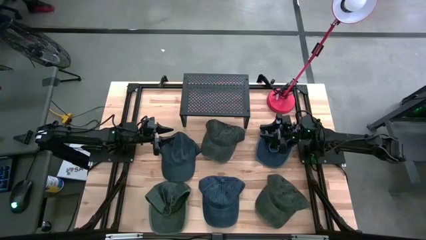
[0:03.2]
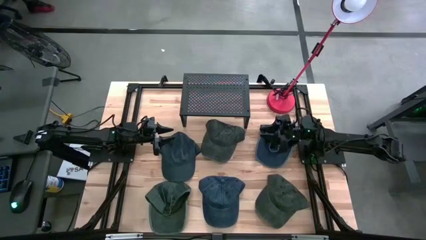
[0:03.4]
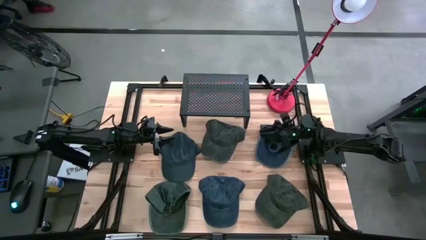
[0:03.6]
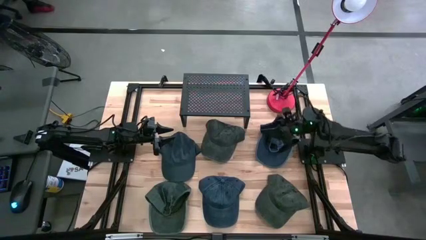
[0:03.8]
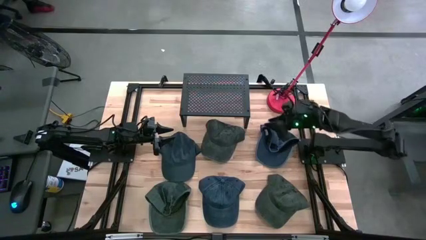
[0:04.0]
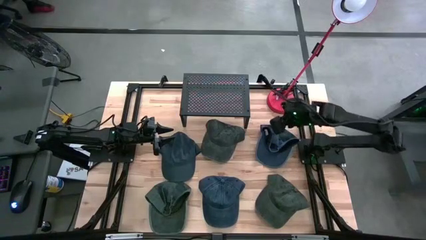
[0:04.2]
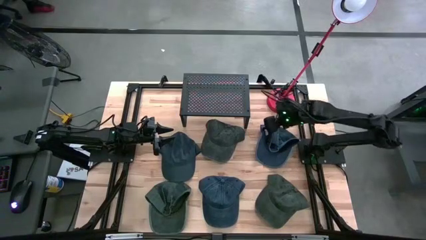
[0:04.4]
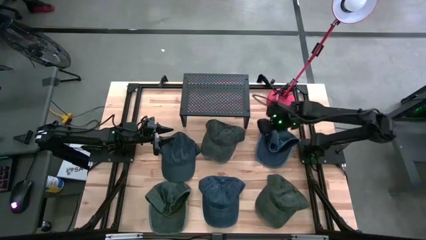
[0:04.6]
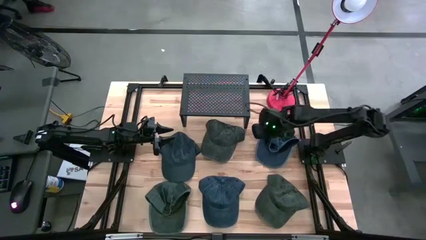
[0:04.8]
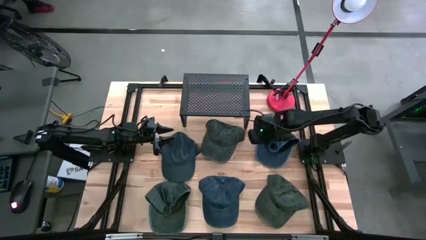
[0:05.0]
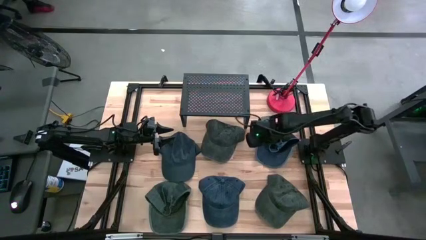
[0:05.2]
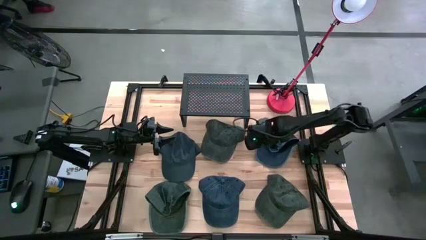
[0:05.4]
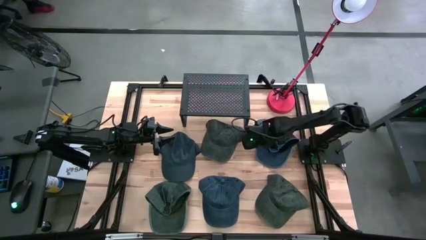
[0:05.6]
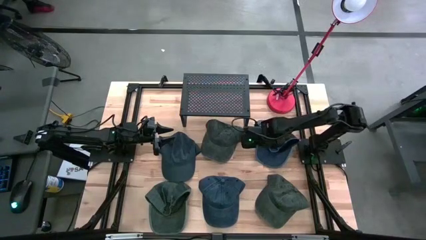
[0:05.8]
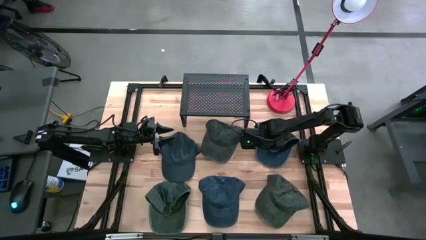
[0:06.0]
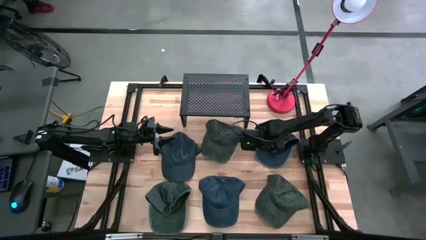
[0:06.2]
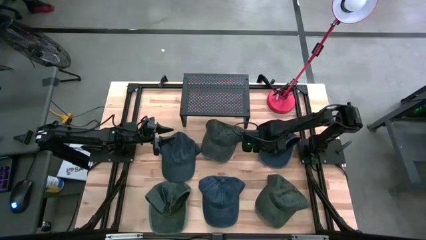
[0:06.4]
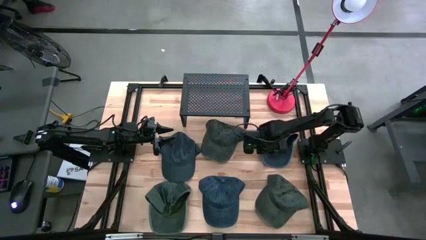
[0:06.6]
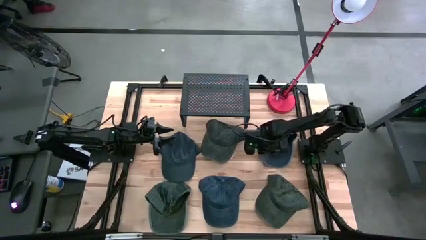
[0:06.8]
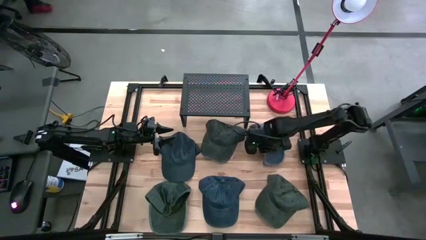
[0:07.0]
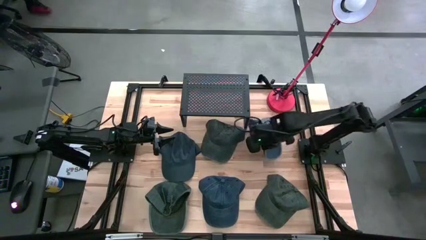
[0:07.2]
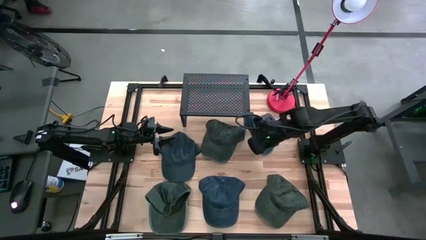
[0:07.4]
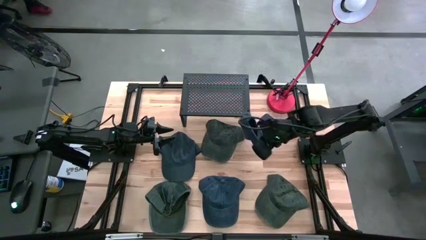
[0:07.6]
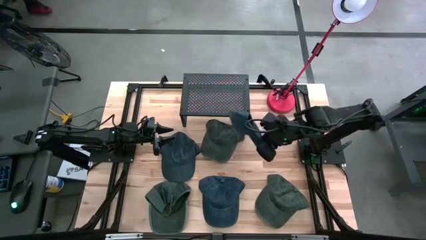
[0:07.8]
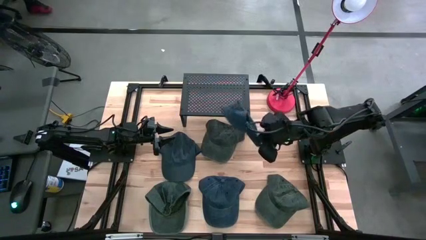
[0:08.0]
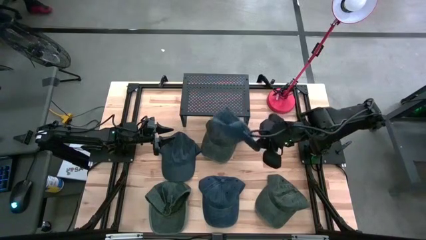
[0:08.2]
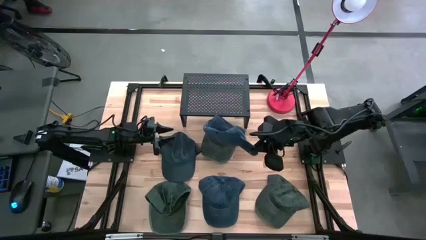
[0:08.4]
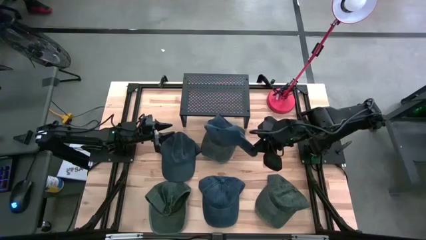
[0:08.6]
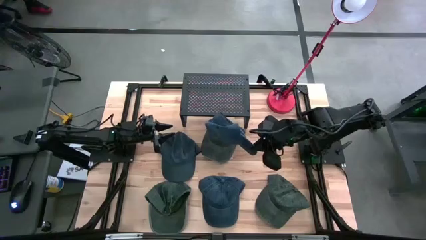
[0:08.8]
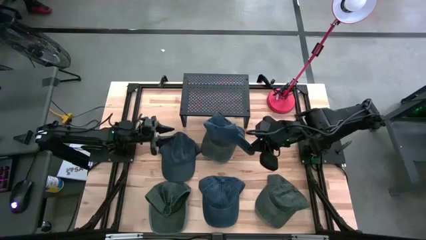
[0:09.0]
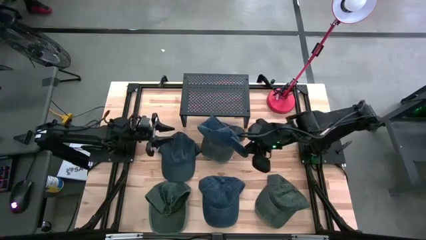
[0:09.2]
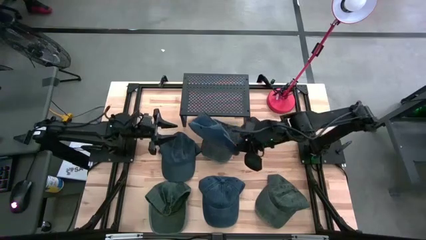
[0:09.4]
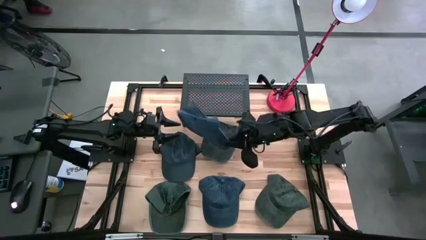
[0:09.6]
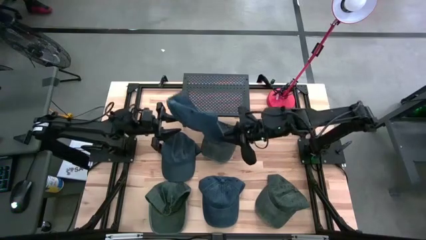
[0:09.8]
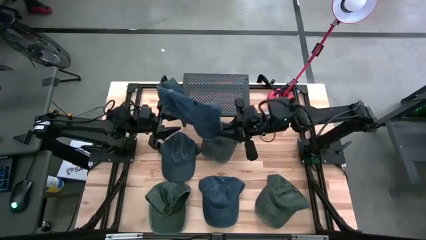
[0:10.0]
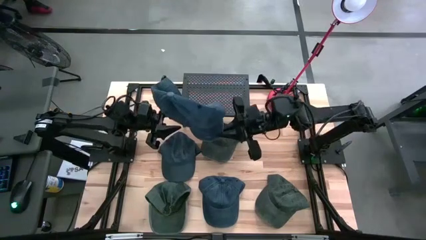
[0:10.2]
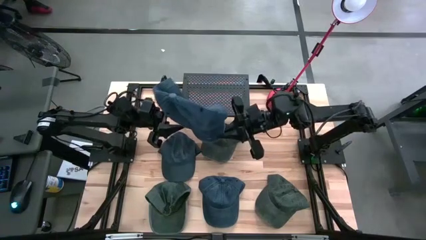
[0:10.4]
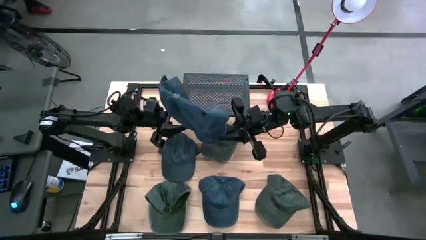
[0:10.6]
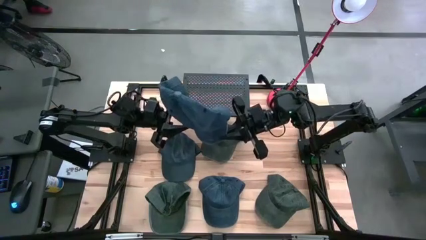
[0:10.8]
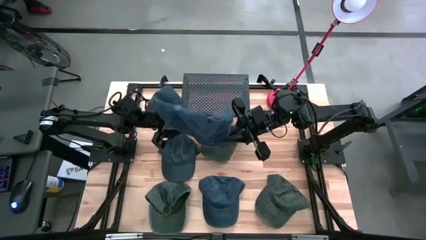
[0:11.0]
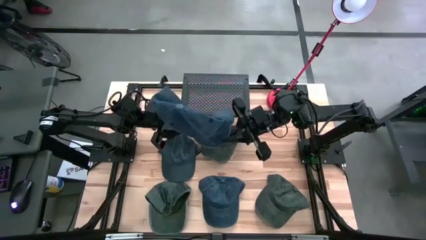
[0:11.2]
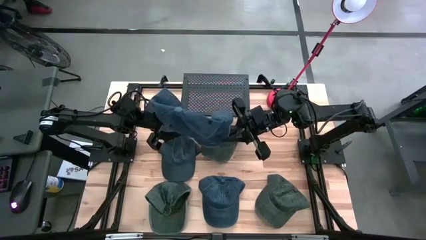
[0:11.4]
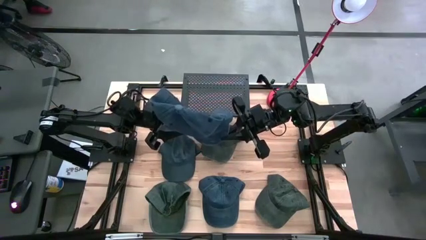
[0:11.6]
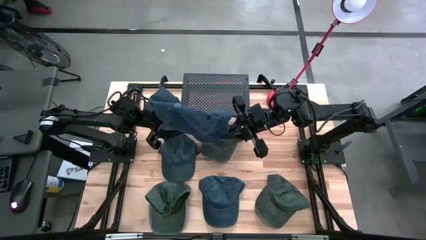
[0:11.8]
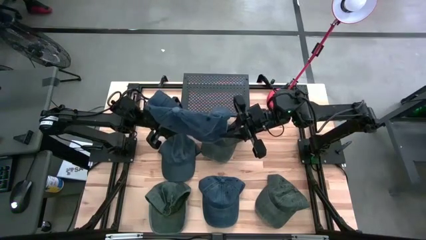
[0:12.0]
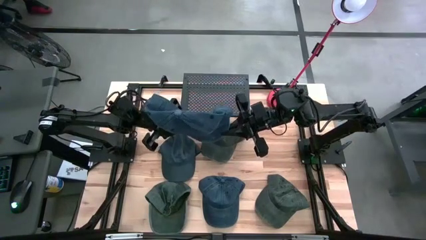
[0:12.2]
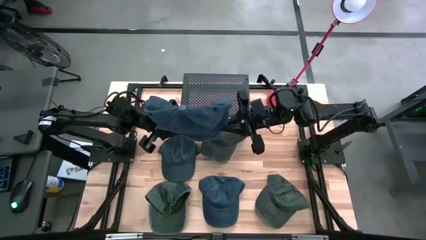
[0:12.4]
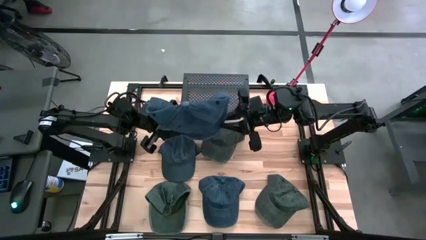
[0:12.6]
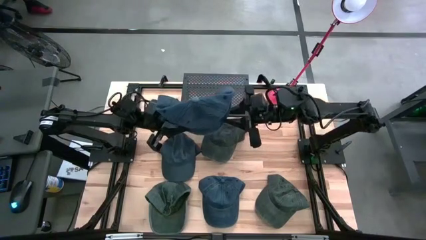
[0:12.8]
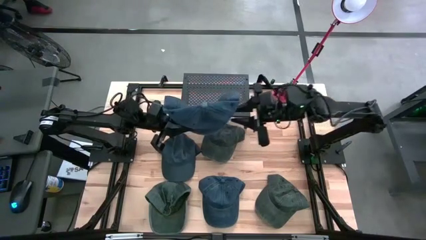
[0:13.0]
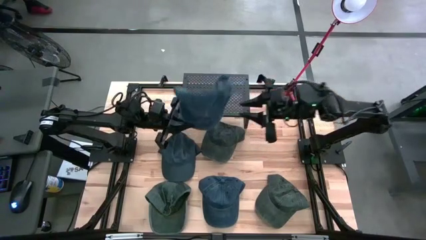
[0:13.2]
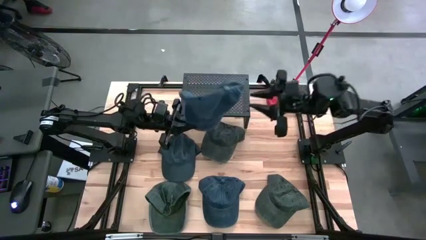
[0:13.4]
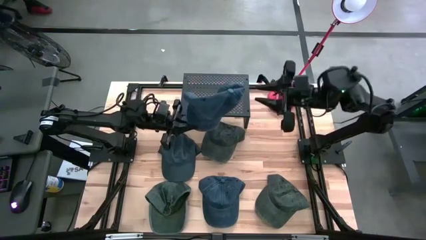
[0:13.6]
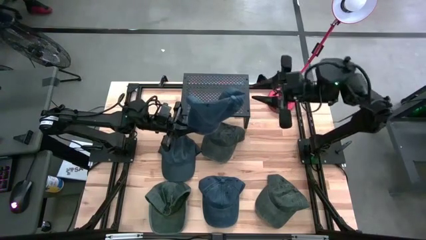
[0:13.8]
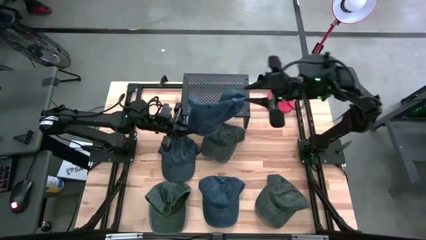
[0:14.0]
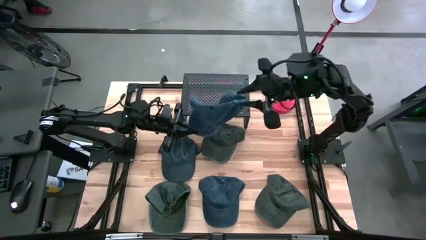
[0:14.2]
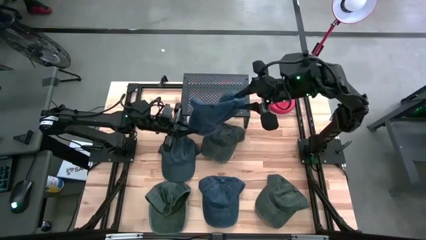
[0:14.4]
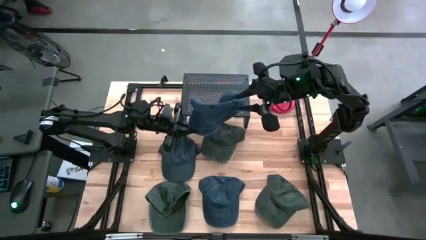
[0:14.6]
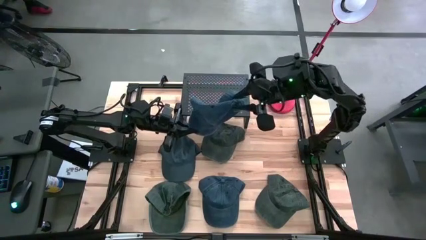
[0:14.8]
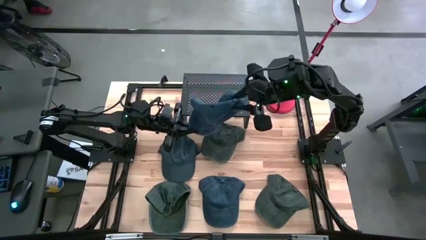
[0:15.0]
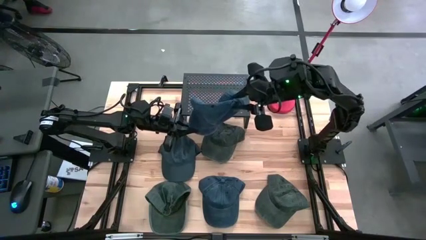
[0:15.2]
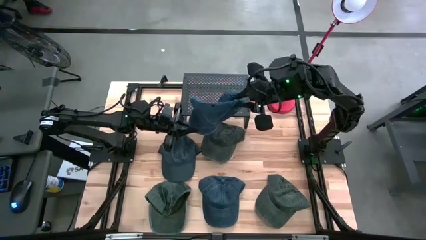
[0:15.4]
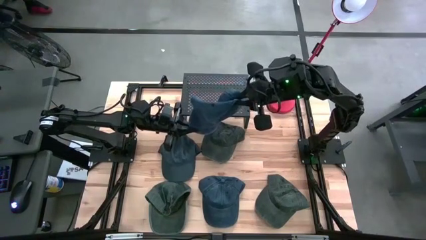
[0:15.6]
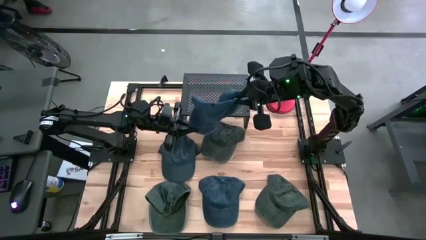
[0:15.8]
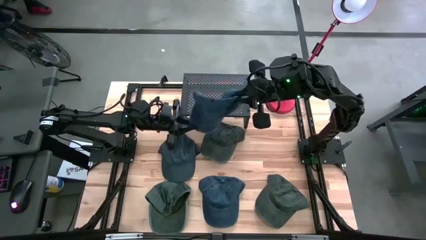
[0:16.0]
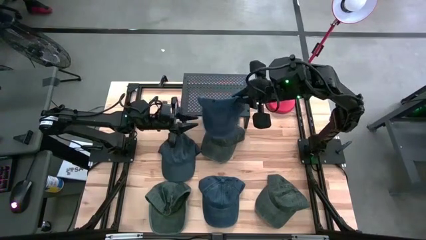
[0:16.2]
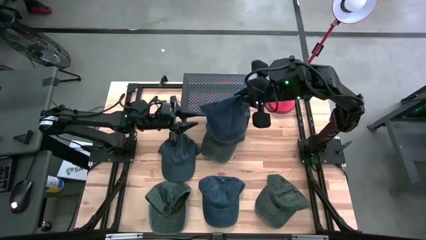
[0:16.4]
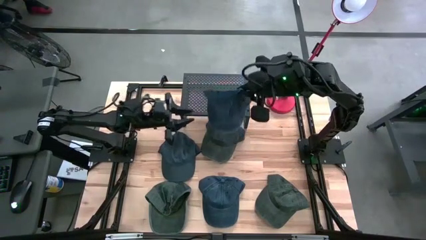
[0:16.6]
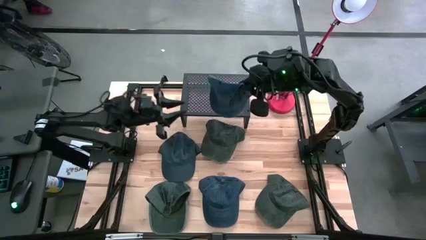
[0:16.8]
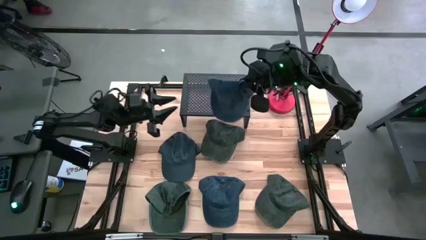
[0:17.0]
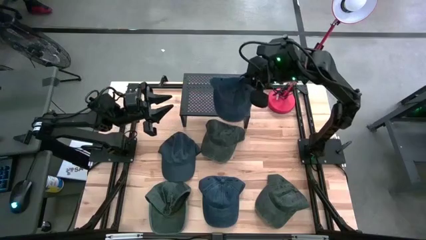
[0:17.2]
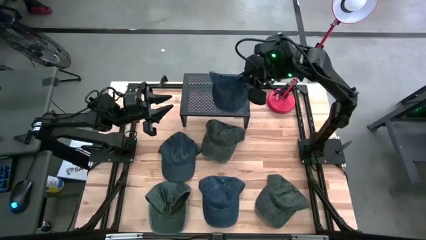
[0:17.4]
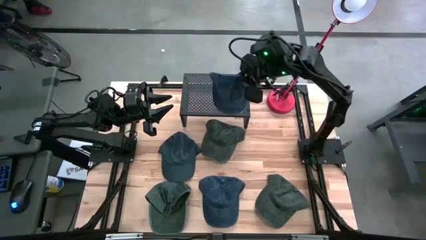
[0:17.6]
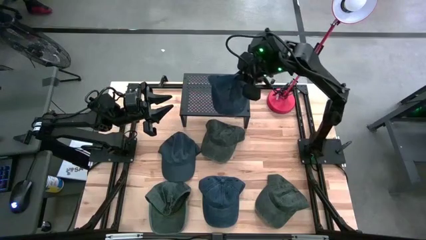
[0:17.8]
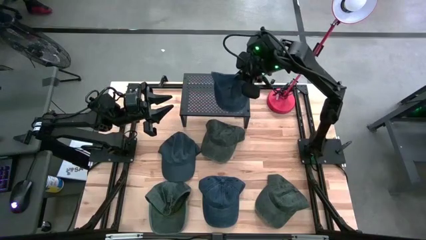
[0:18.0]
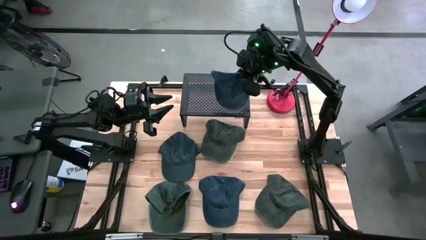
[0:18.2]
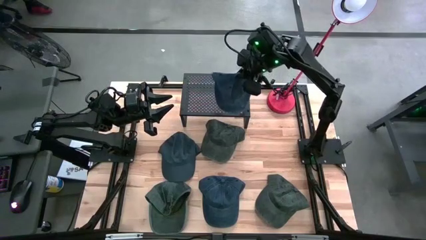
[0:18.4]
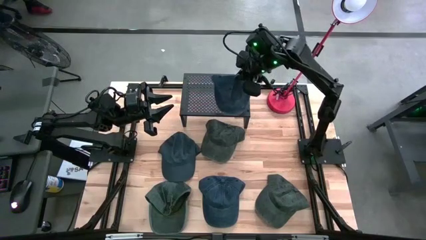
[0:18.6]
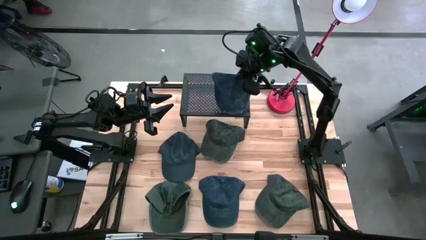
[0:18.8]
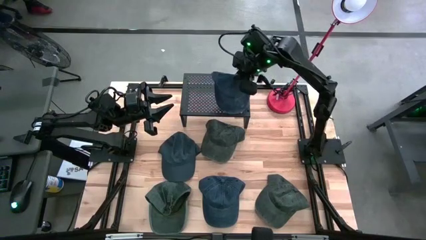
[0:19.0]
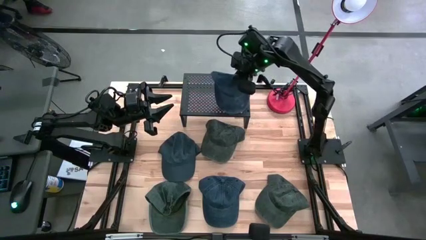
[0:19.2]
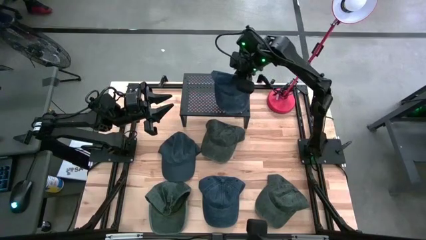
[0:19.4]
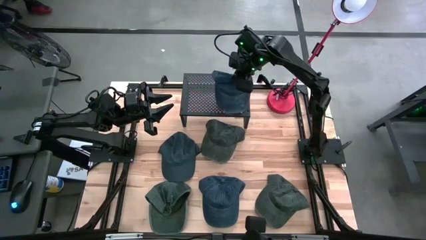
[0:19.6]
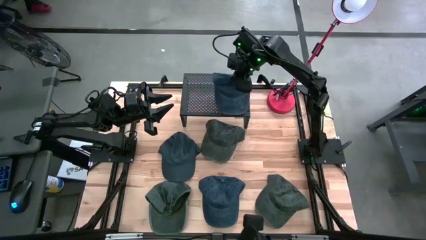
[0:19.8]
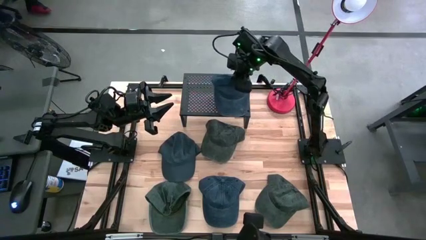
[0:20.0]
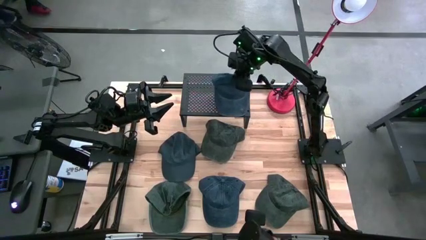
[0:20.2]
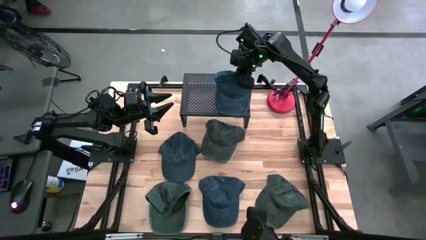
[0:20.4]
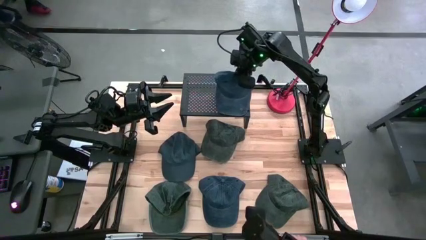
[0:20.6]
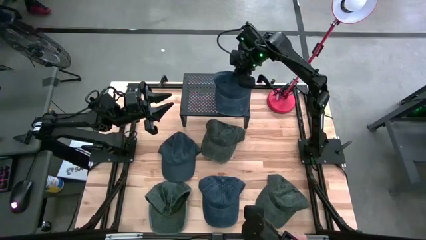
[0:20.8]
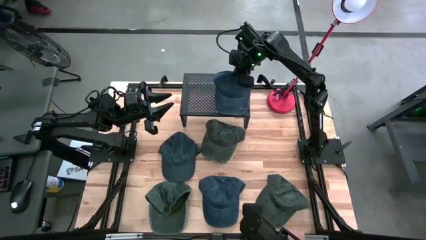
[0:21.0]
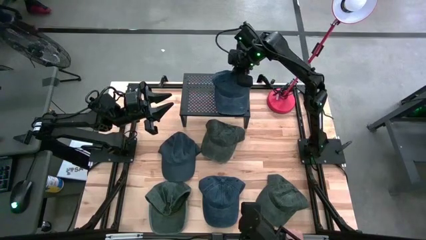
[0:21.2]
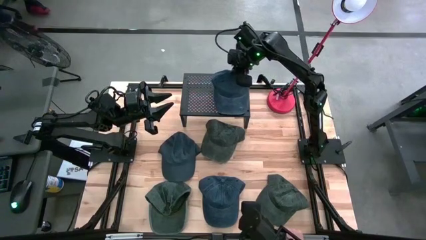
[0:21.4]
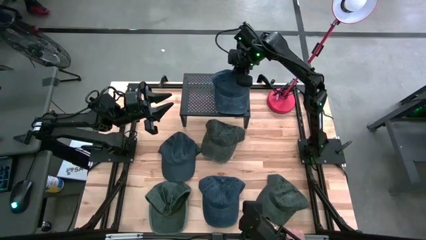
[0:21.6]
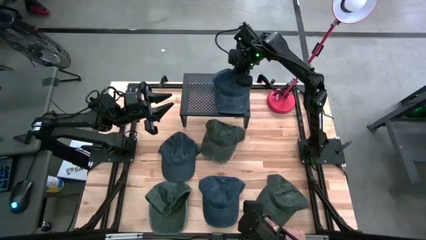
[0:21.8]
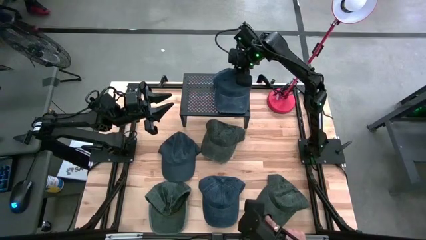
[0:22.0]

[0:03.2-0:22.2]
Task: Pick & Place hat
Put the top right dark blue cap on the shelf
